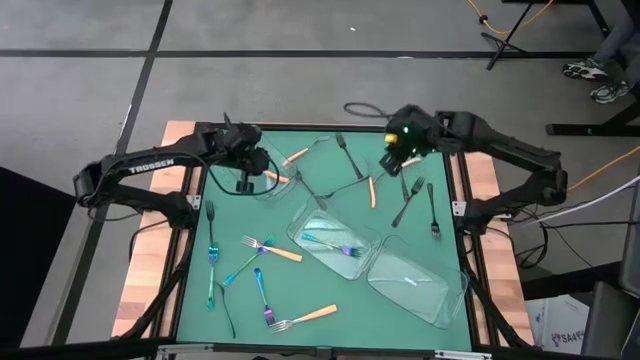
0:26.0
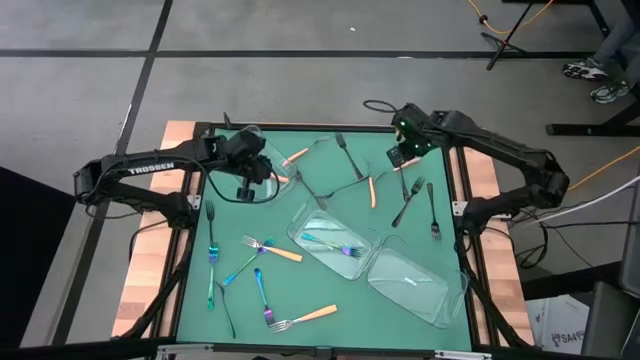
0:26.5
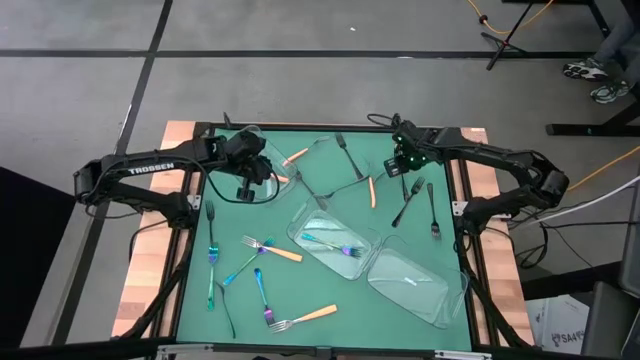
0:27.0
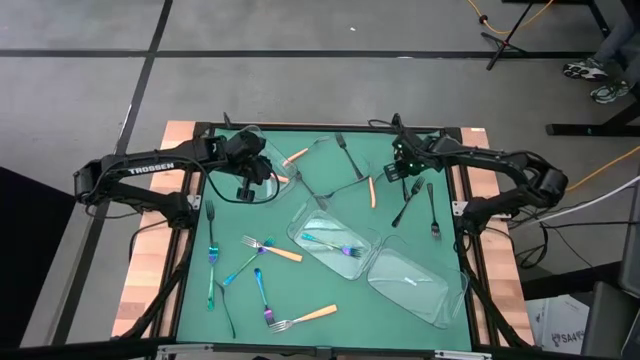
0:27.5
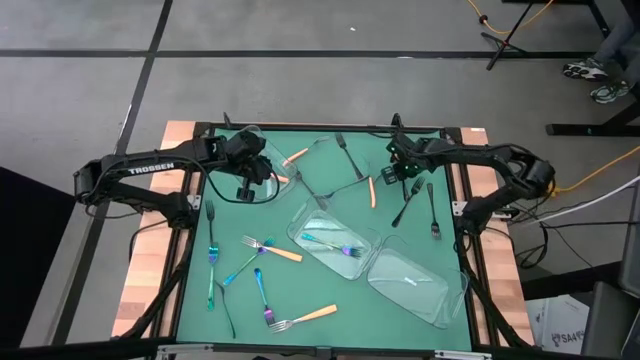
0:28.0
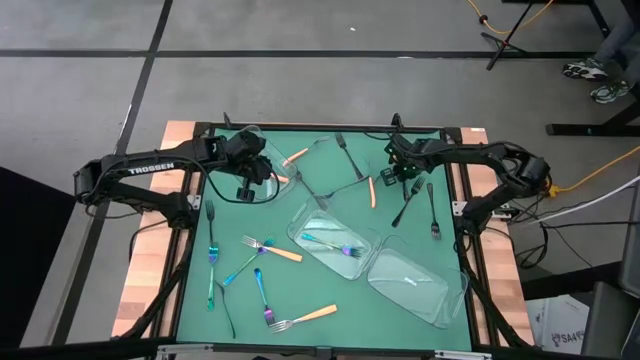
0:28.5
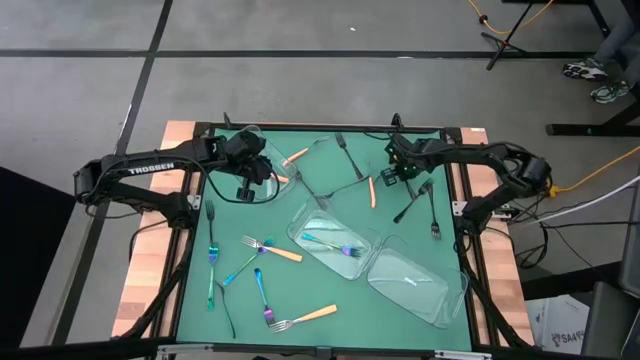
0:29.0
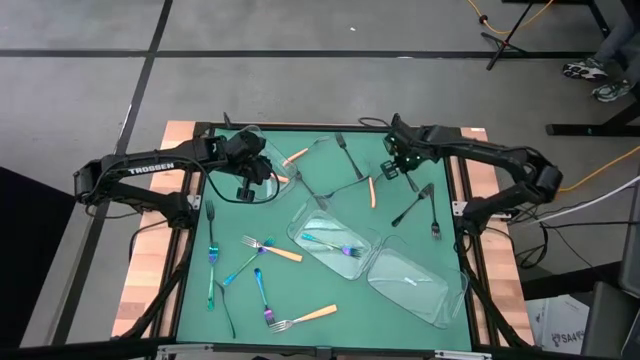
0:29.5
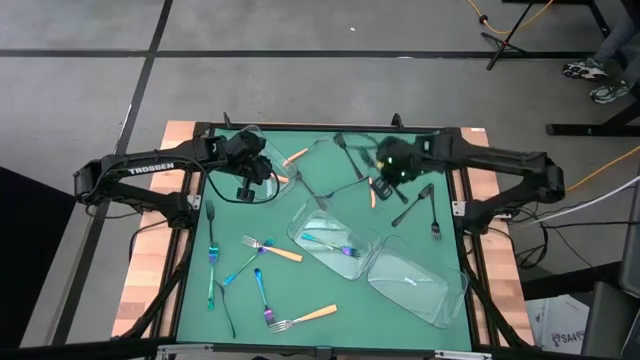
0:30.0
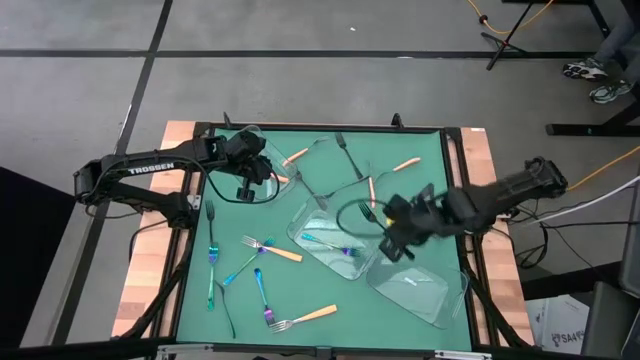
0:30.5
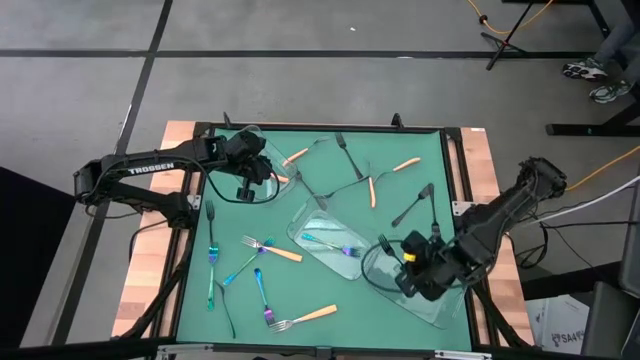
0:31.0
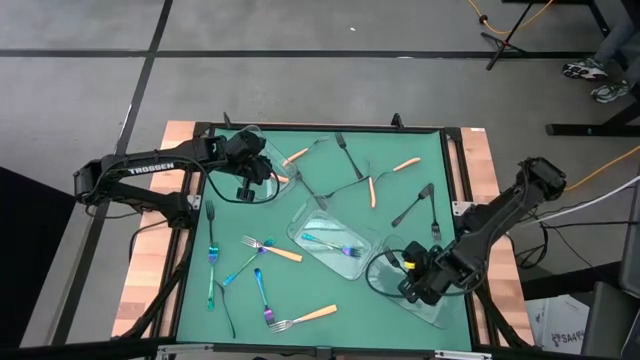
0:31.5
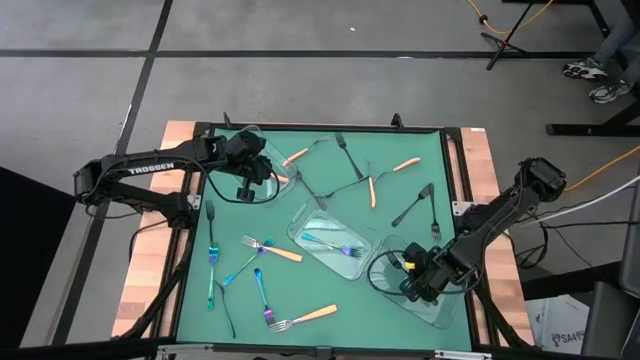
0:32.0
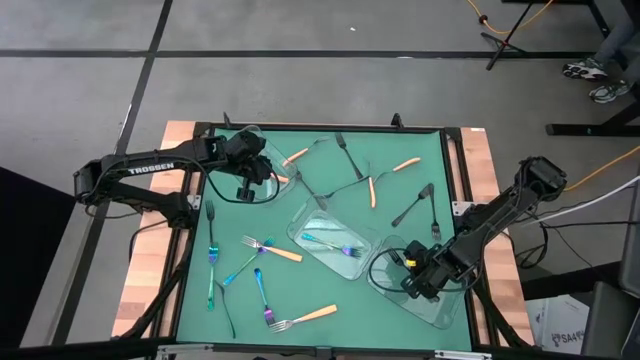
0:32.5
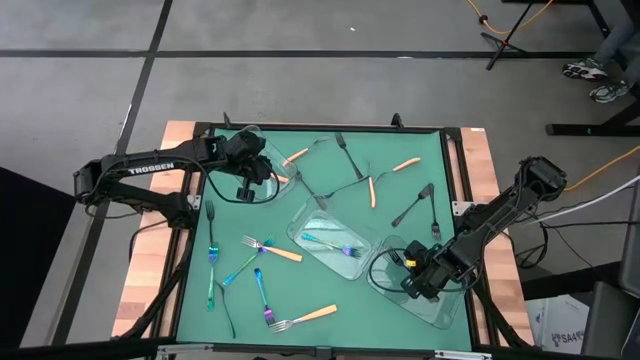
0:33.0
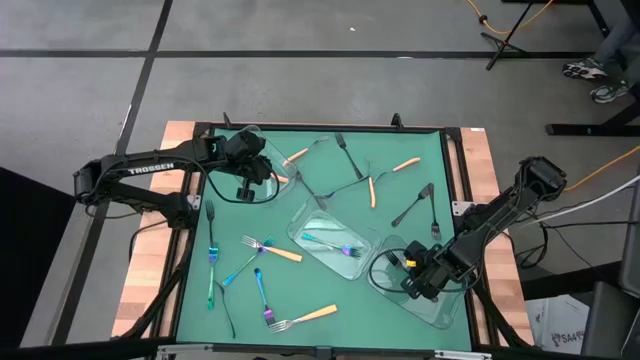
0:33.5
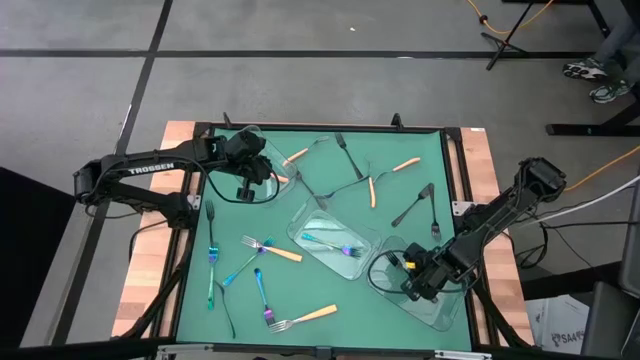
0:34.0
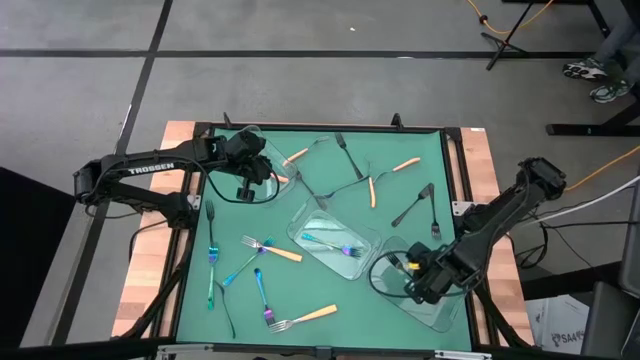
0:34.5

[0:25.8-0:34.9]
Task: Sort silverware by color (type)
Put the black fork into the bottom transparent bin

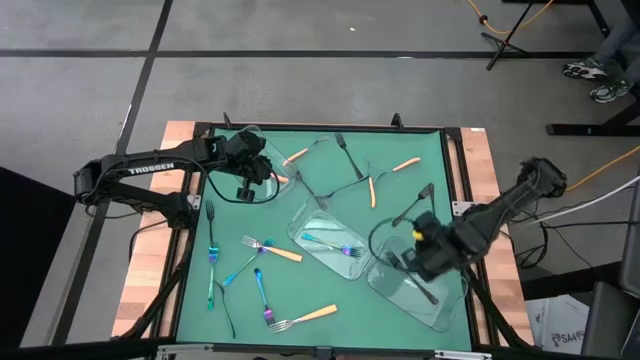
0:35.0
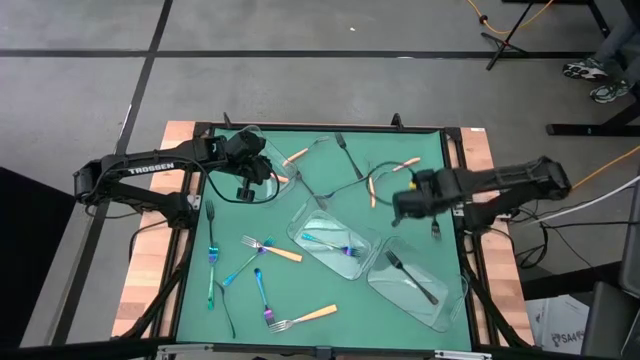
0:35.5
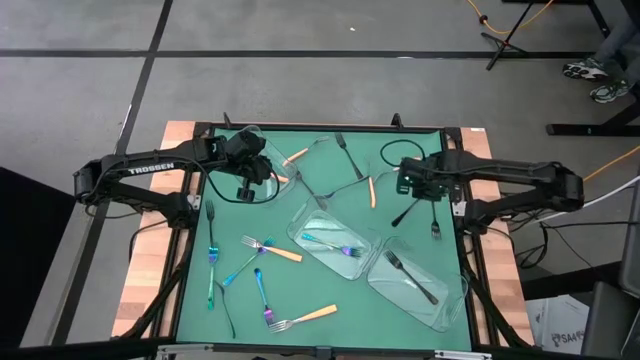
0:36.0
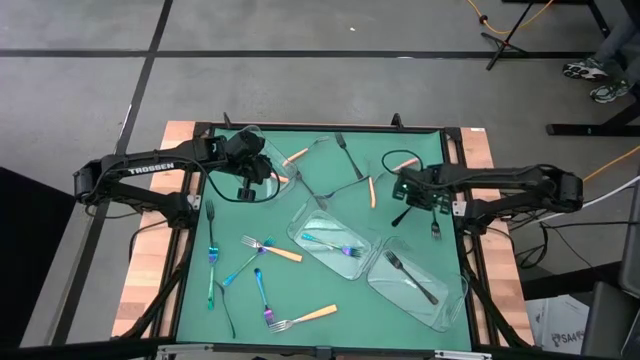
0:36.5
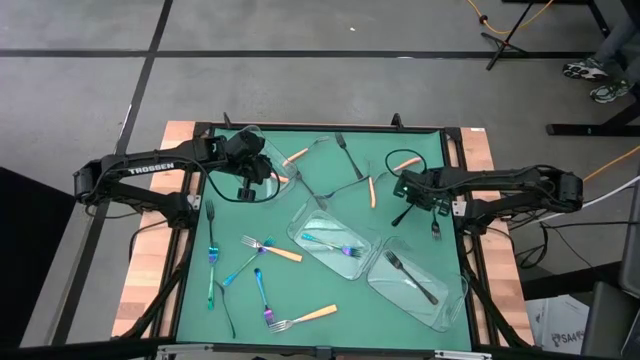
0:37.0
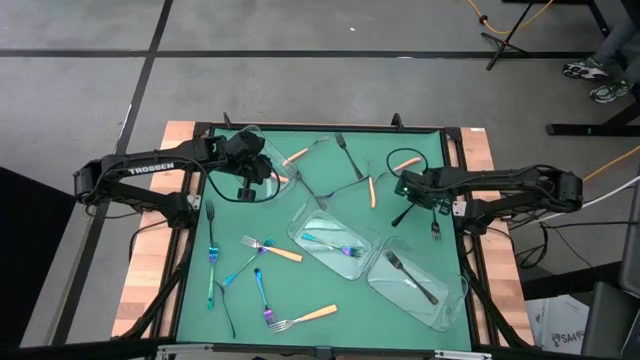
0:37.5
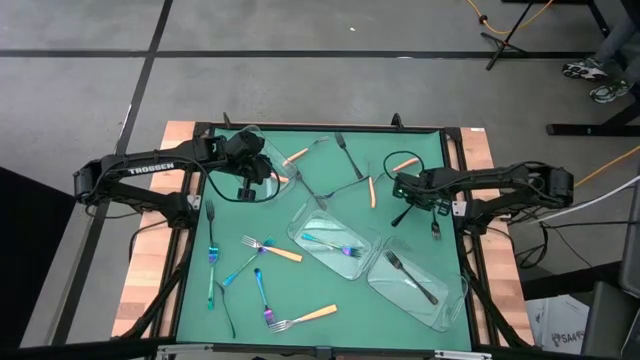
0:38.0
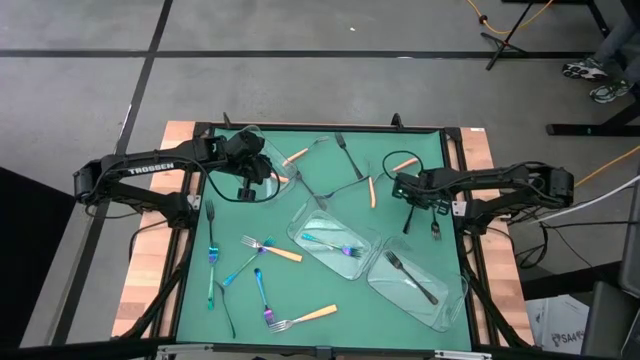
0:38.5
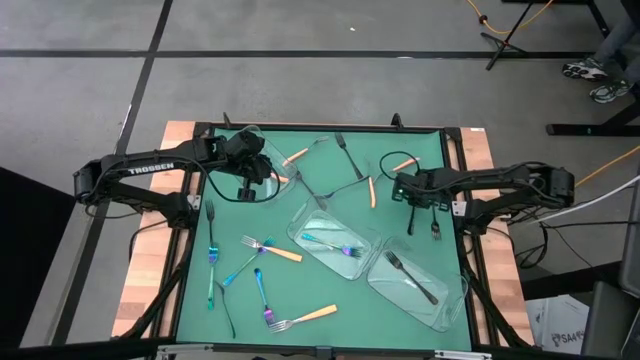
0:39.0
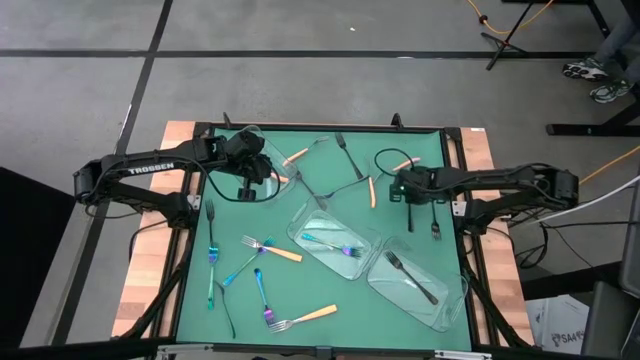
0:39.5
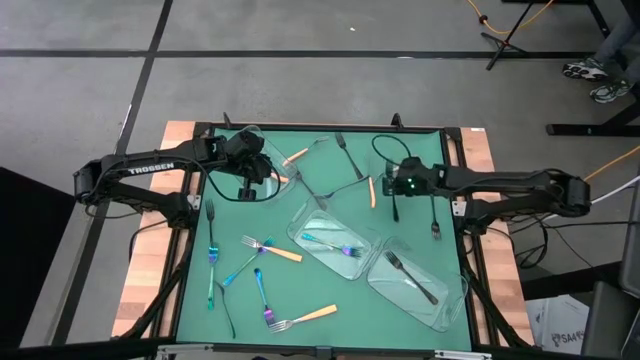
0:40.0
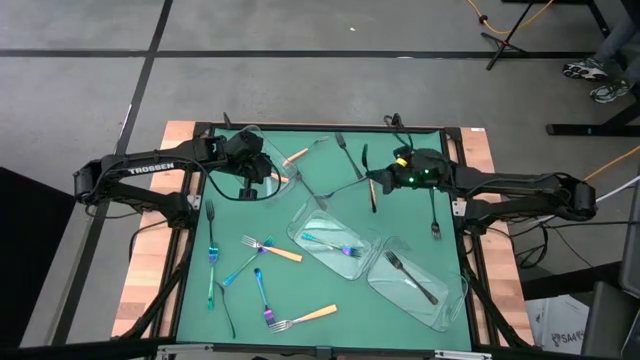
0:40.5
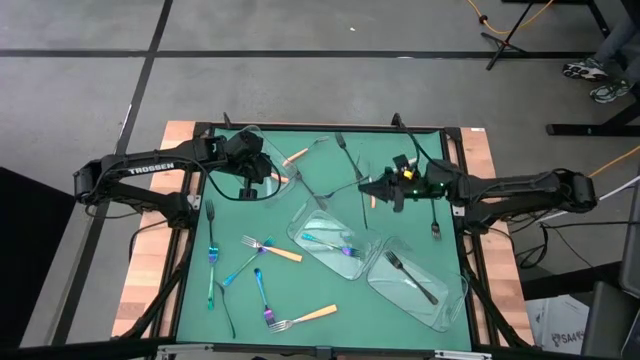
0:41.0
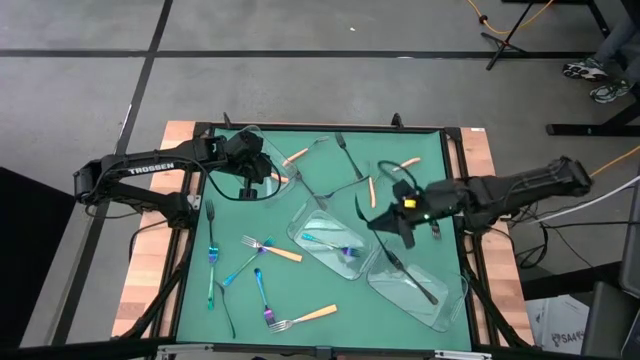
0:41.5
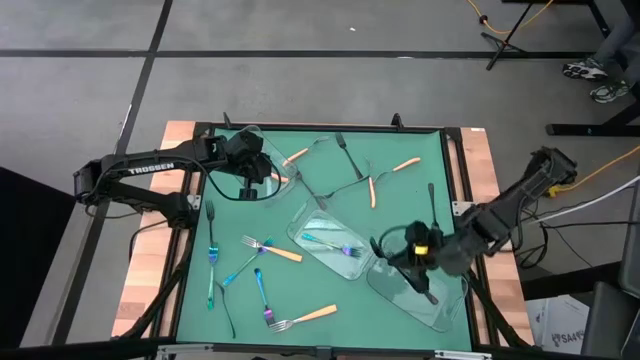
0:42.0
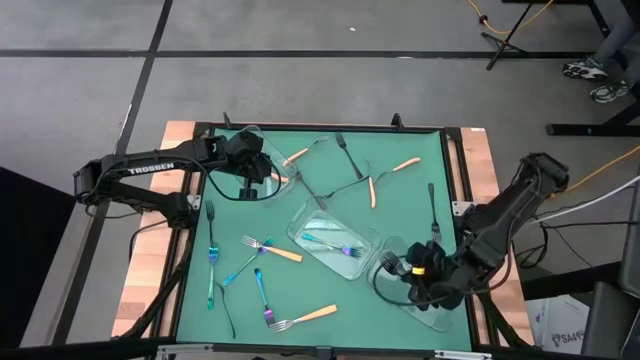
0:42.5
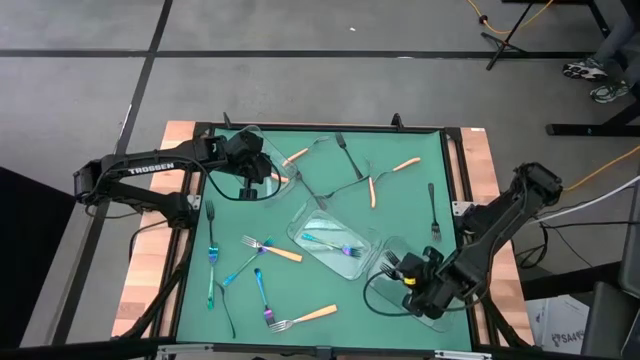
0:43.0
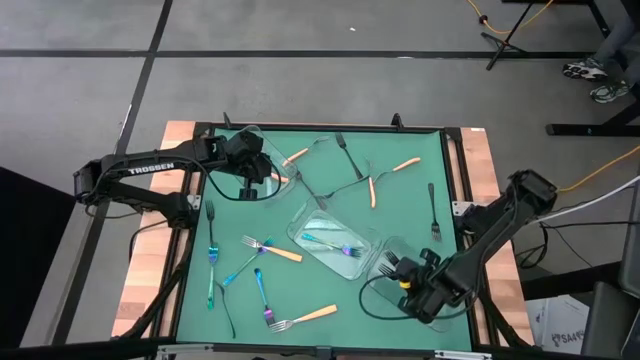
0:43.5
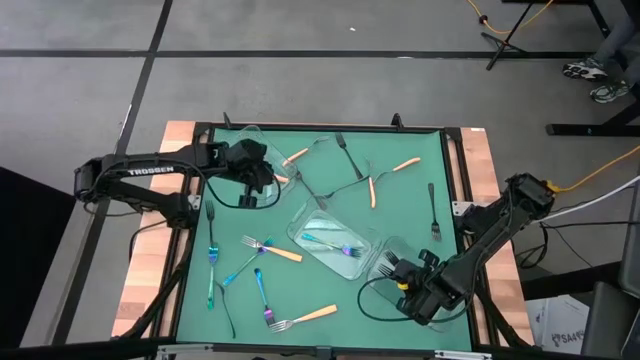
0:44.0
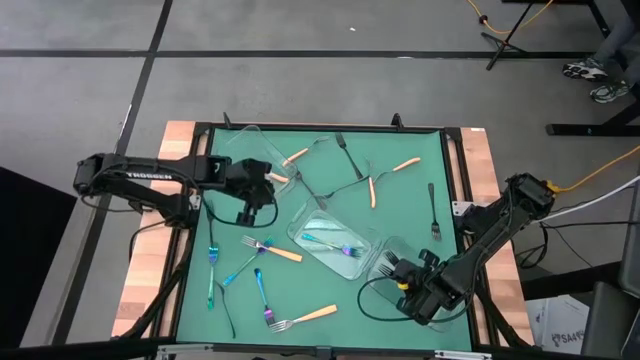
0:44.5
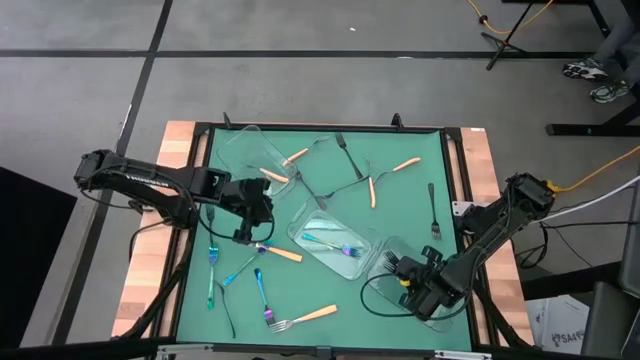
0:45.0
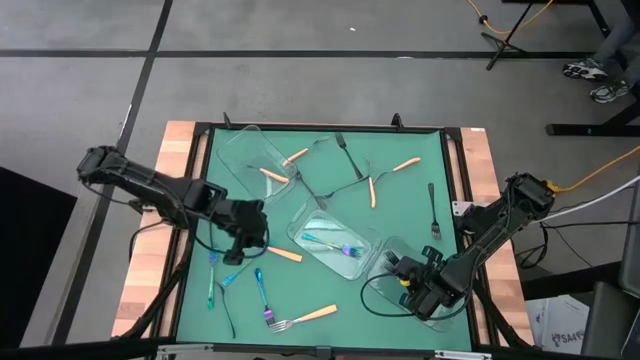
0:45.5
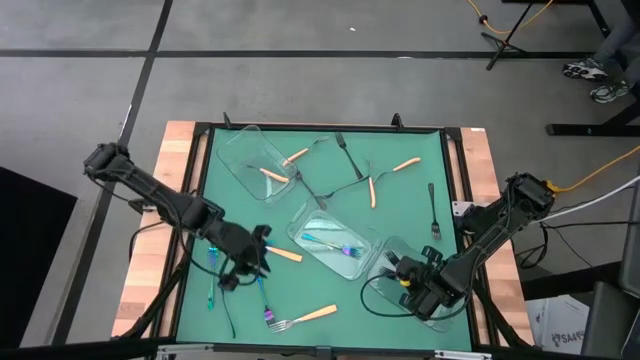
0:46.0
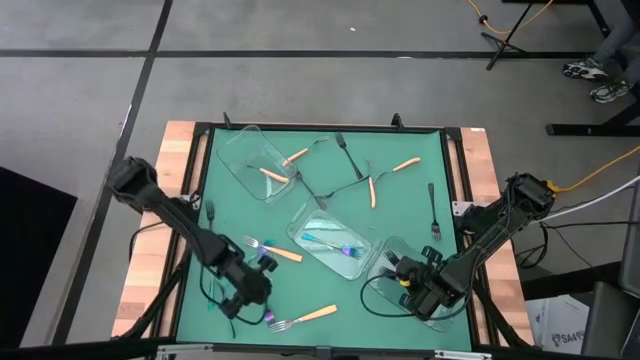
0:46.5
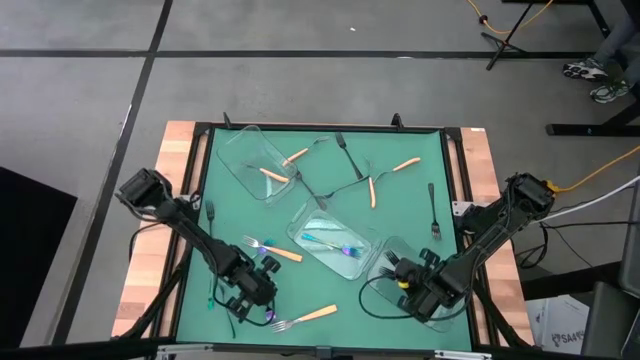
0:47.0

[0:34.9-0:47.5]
Put the black fork into the bottom transparent bin
